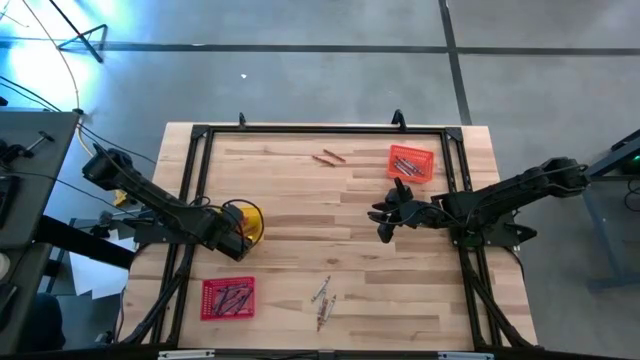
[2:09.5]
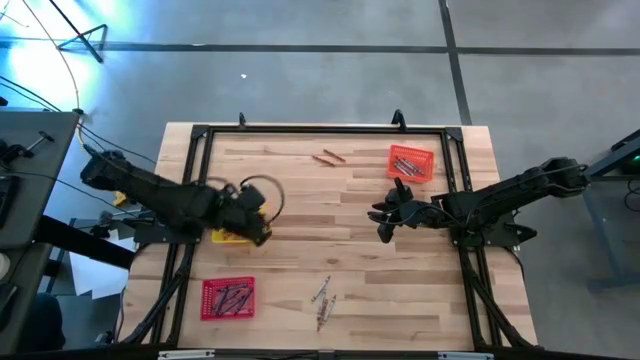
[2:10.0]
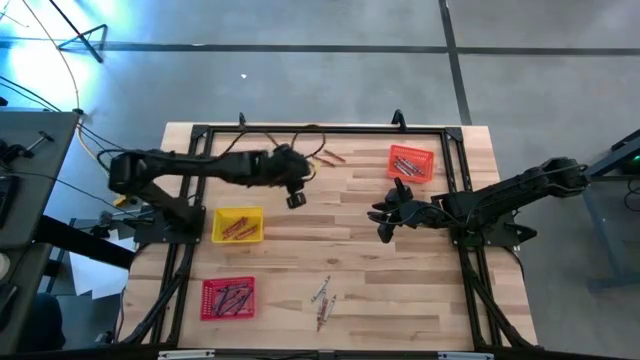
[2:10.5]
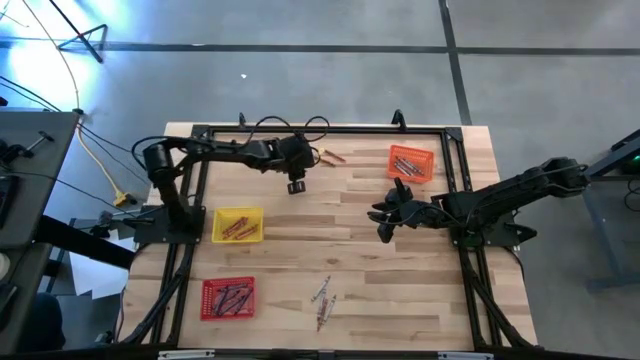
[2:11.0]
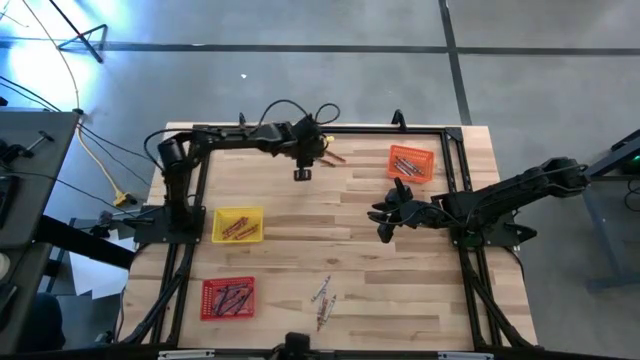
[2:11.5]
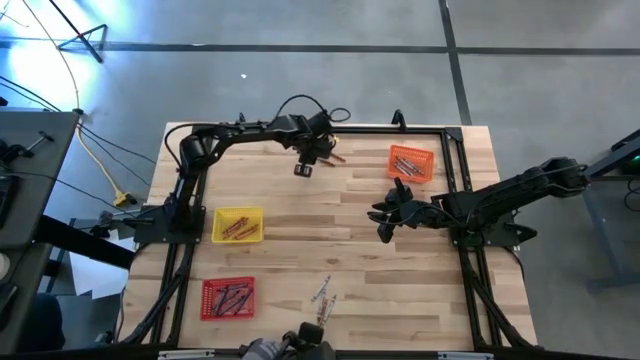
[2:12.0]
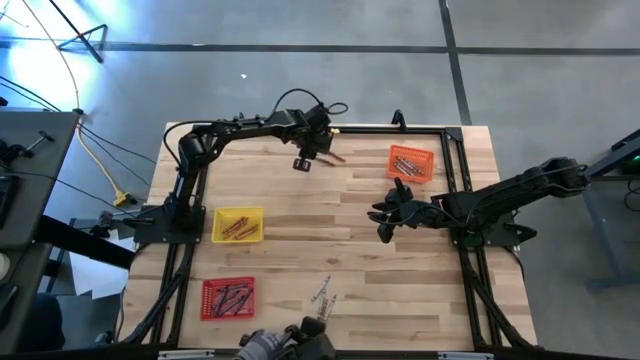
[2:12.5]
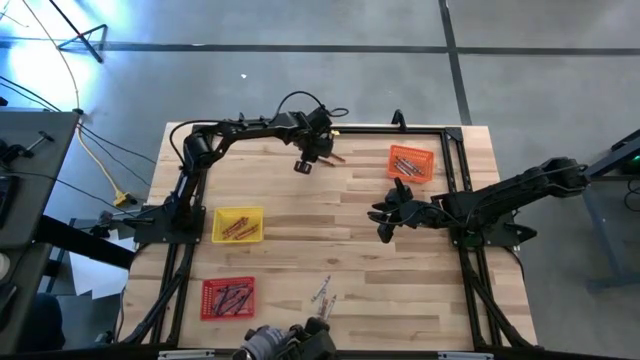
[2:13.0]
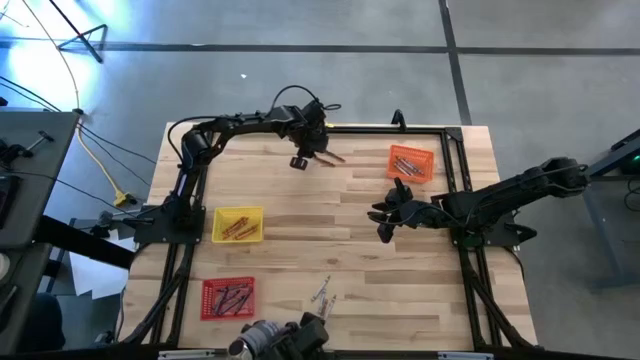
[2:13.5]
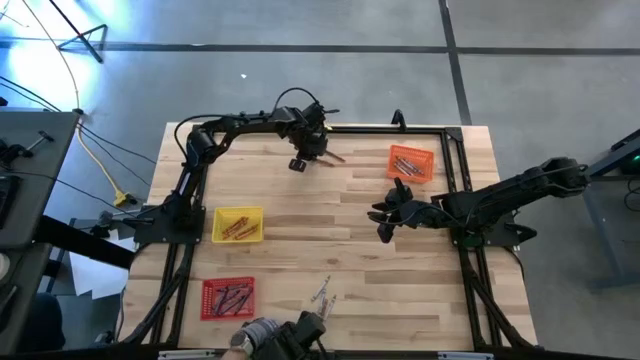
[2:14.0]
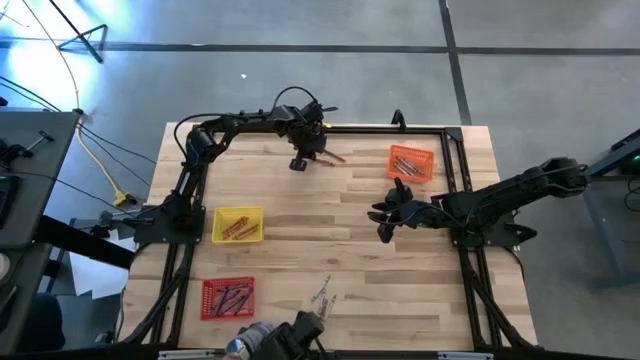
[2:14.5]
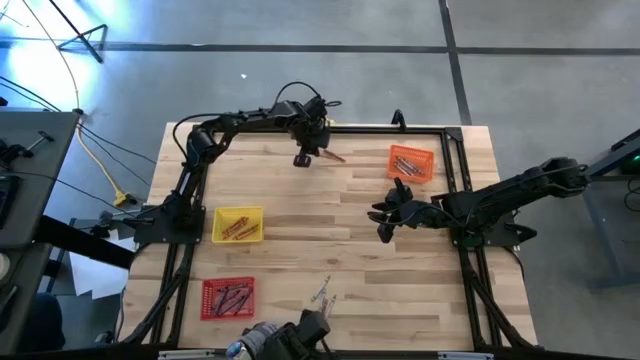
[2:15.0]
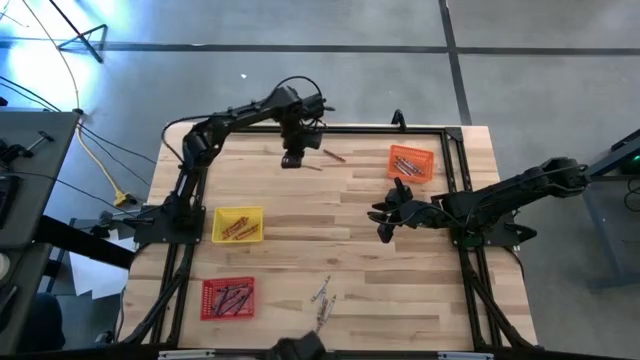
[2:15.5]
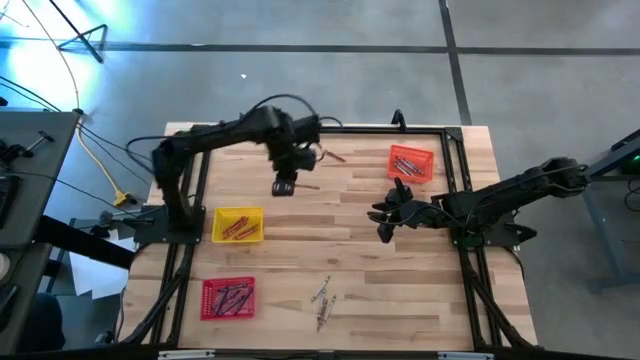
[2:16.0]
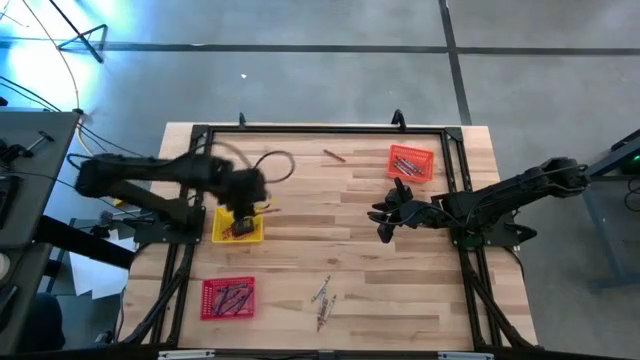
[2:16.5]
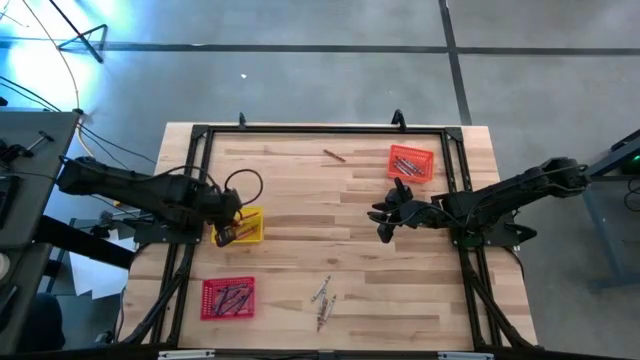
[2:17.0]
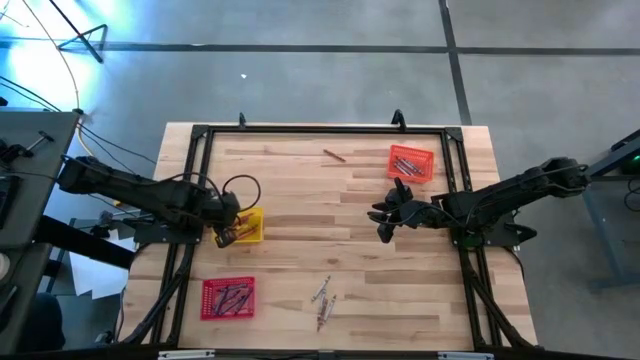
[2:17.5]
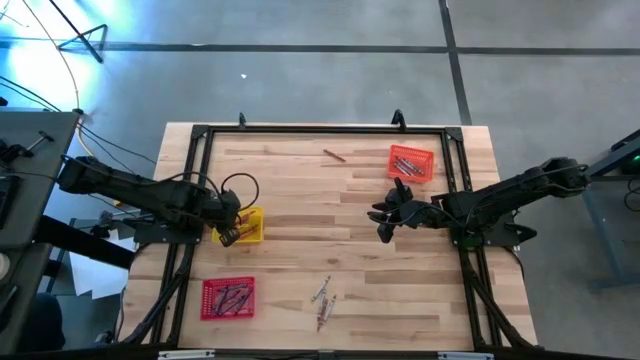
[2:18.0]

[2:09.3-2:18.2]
Task: Sort crayons
Put the orange crayon into the yellow bin

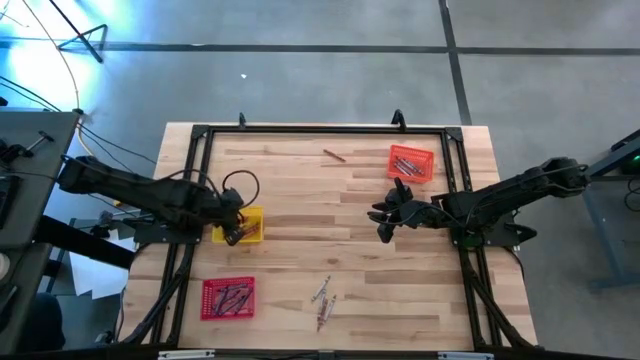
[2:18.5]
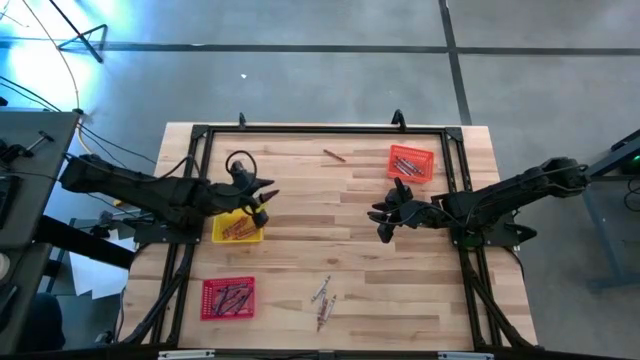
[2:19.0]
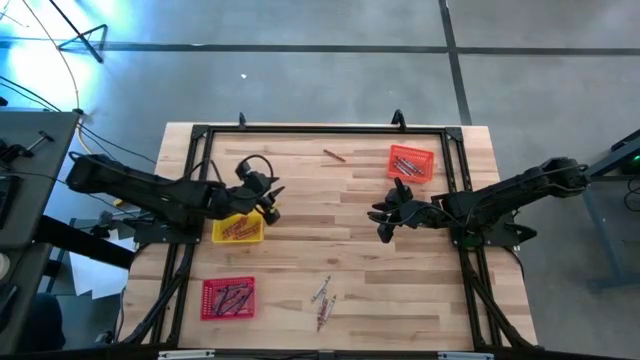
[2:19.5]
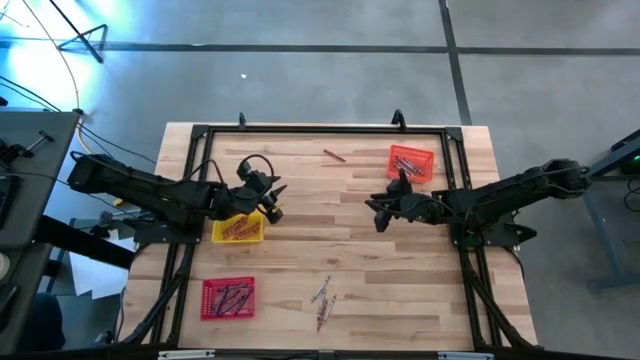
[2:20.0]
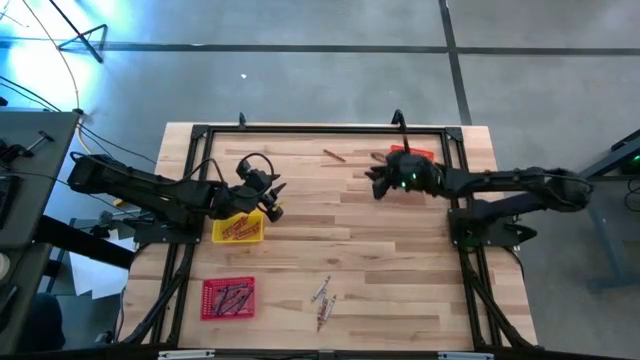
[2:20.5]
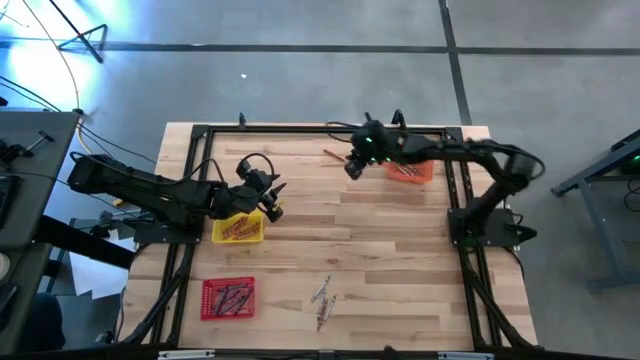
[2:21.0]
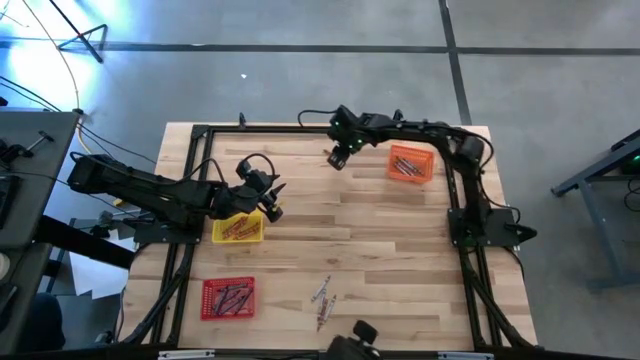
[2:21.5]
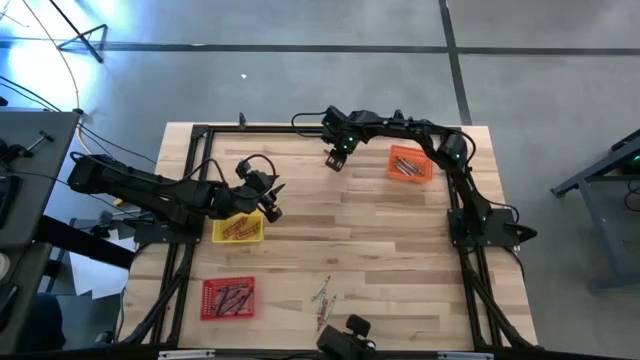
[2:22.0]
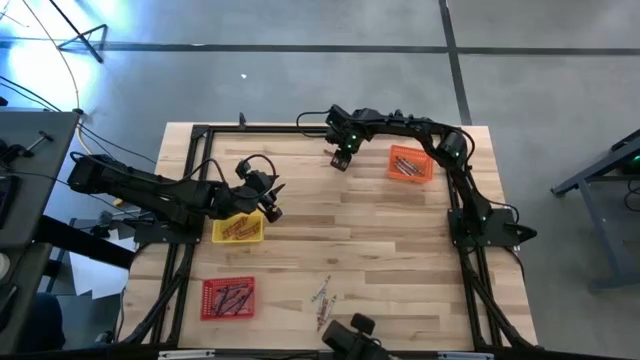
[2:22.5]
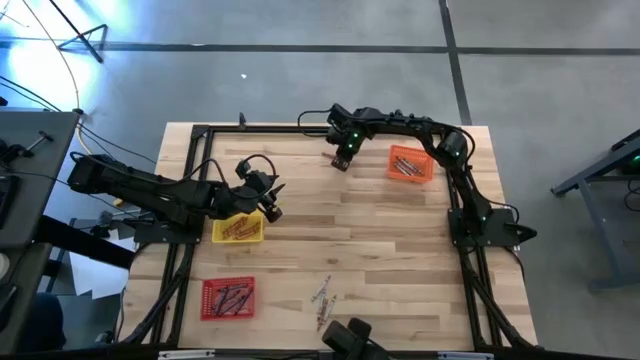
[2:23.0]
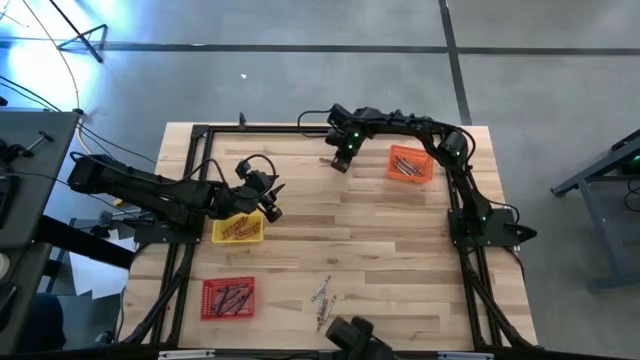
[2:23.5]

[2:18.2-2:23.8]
Put the orange crayon into the yellow bin

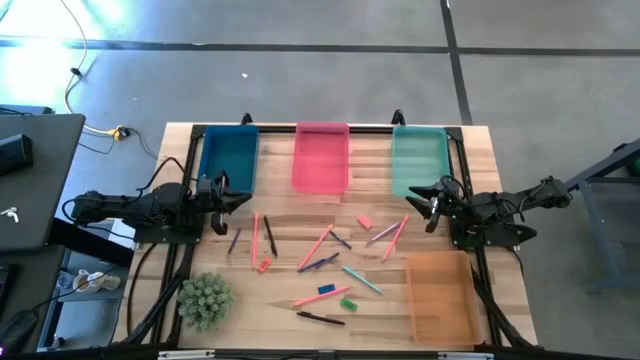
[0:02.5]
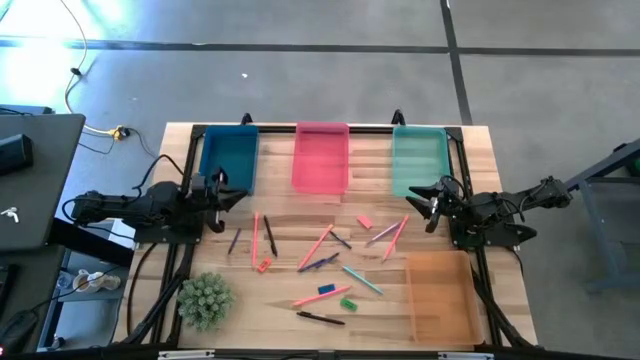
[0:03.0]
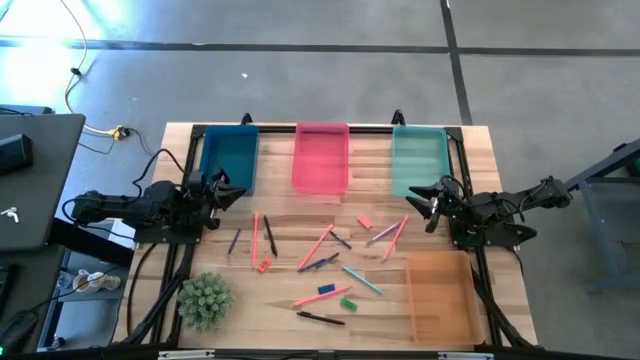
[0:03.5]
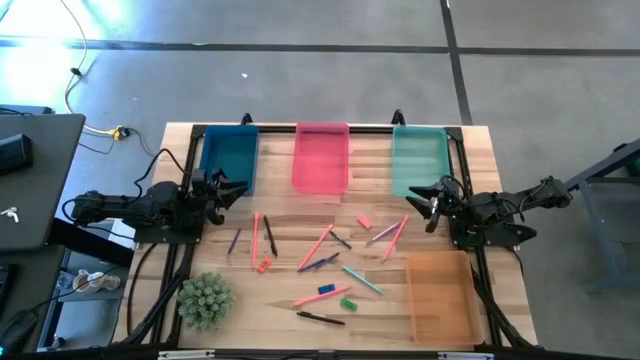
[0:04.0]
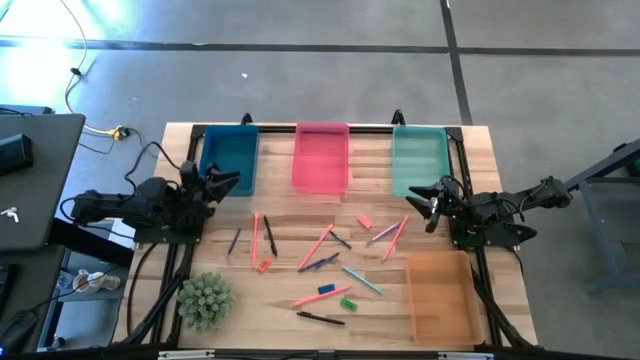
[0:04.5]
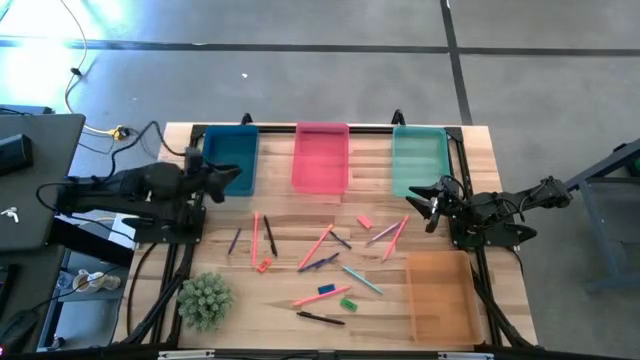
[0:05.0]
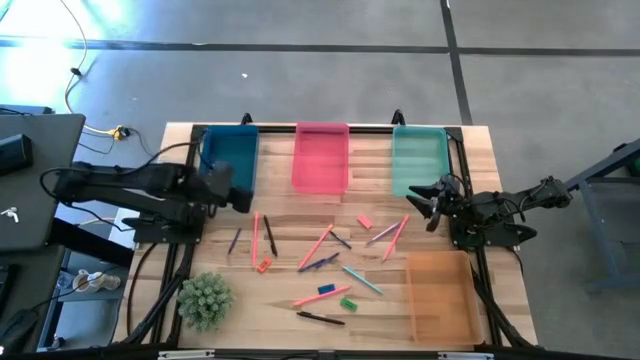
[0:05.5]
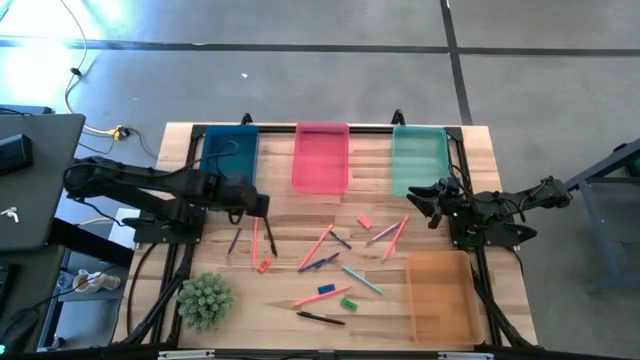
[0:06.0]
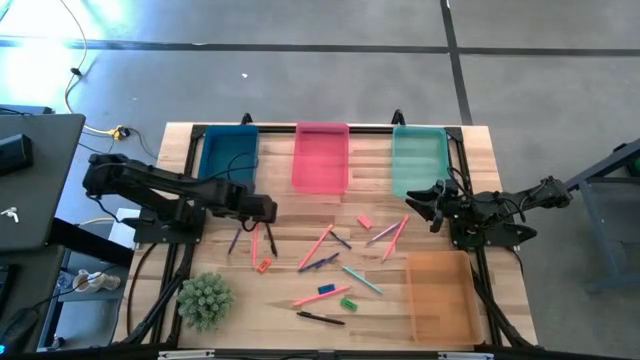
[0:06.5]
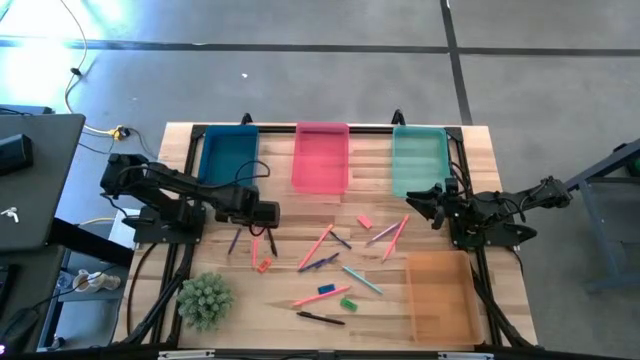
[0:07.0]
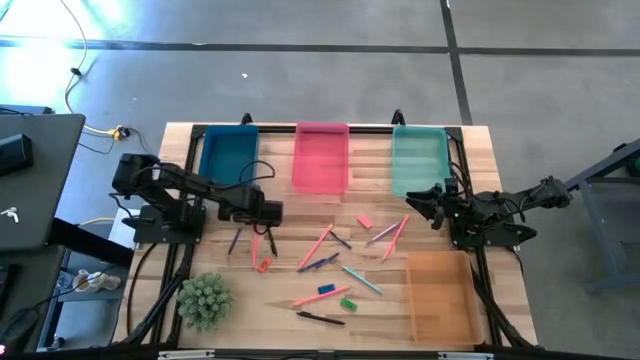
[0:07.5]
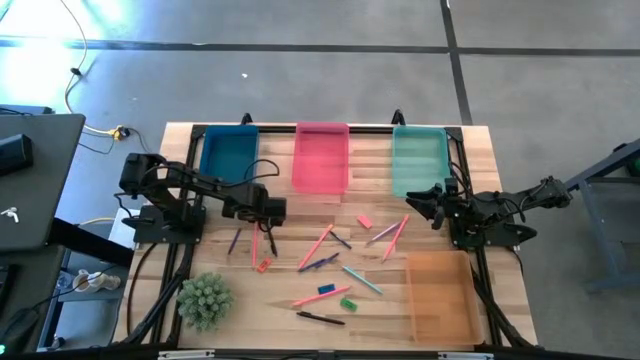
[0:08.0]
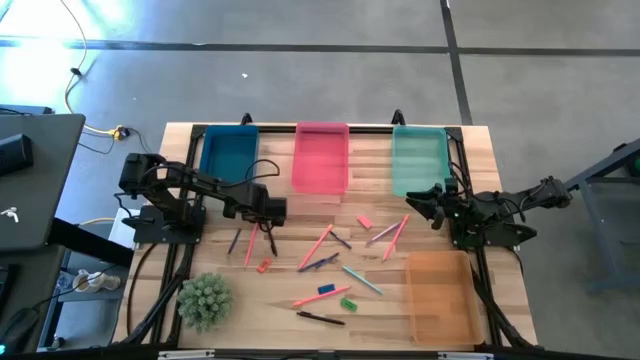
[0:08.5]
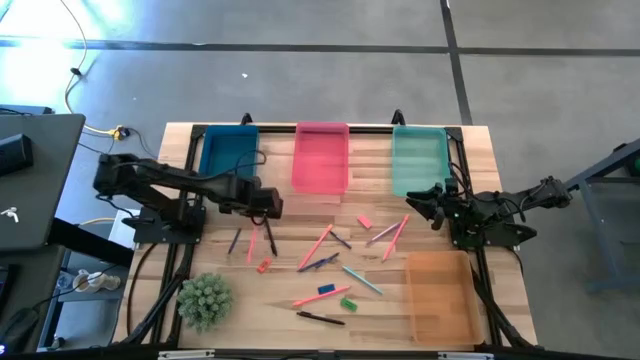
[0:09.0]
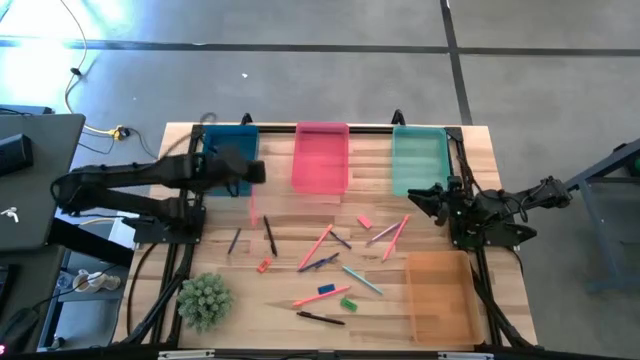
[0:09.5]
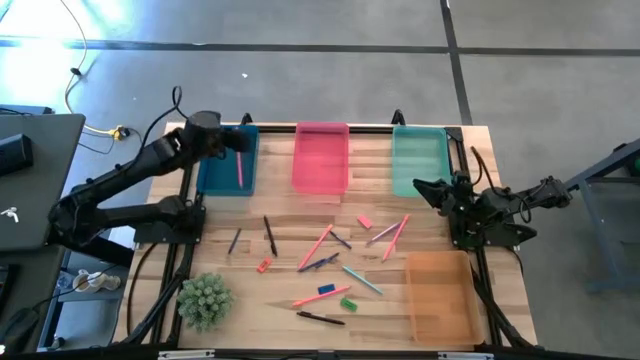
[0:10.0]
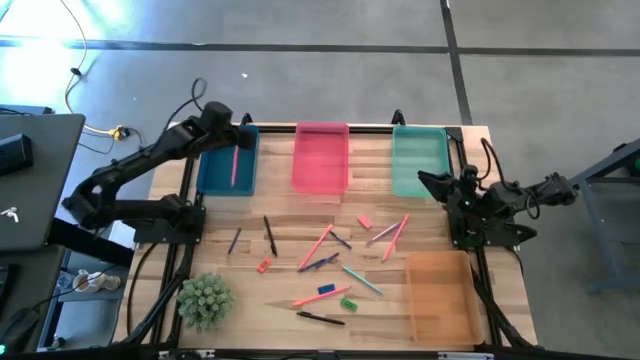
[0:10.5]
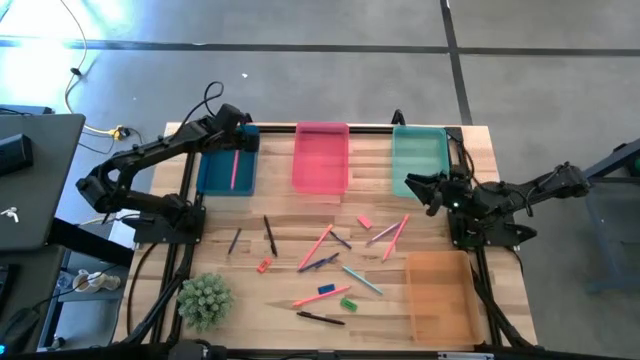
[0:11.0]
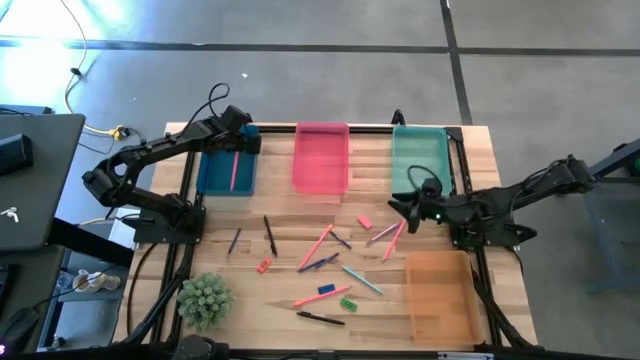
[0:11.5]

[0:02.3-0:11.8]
Task: Sort crayons/erasers/pens/pencils in bins
Put the pink pencil into the blue bin
